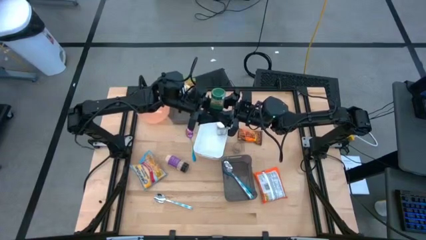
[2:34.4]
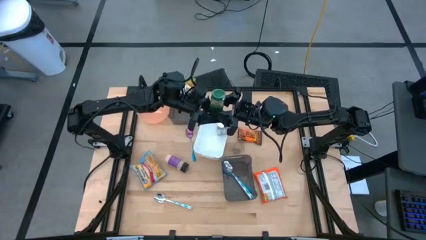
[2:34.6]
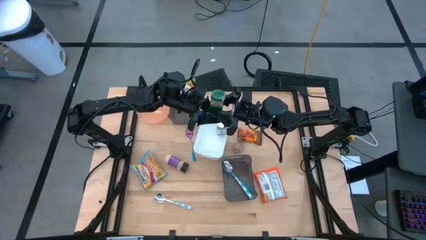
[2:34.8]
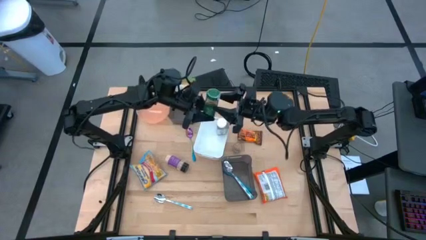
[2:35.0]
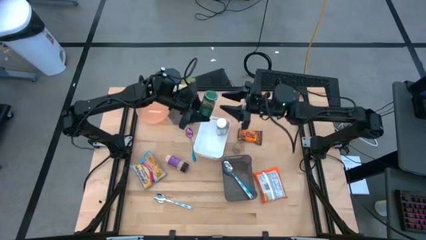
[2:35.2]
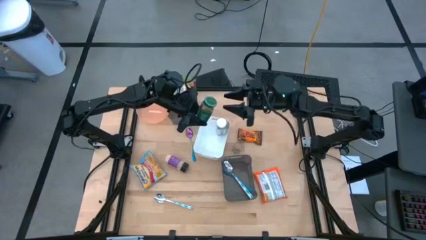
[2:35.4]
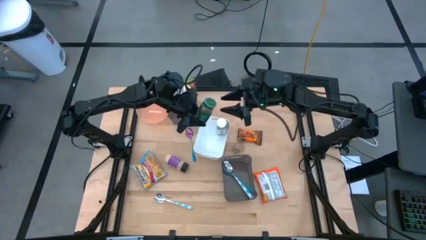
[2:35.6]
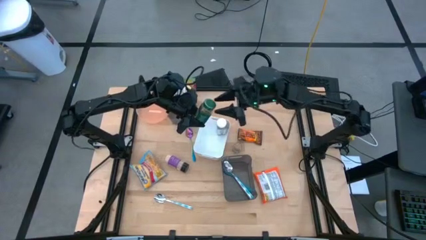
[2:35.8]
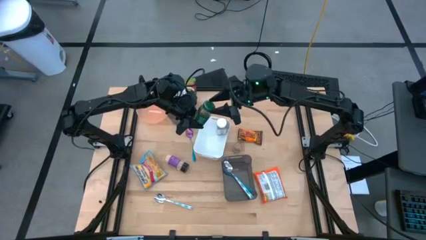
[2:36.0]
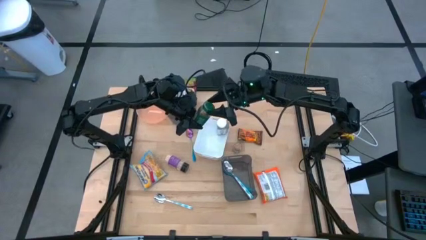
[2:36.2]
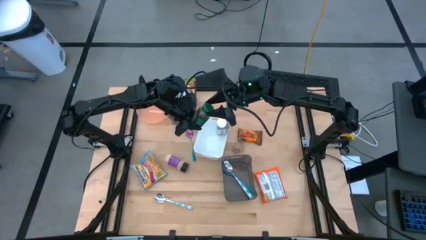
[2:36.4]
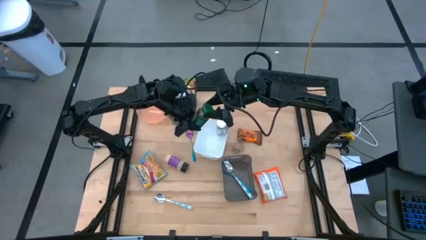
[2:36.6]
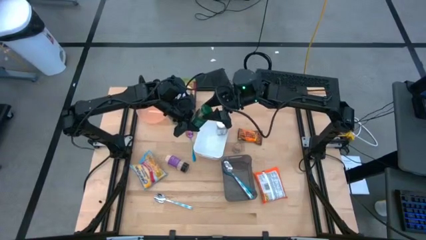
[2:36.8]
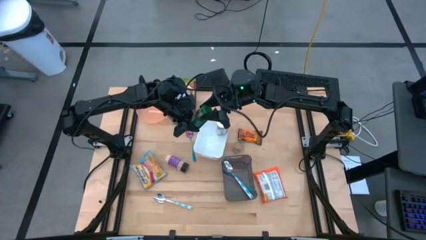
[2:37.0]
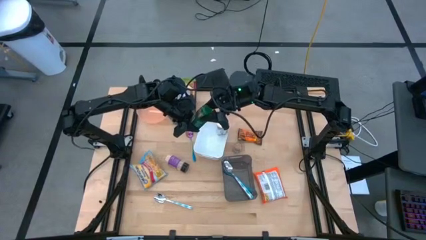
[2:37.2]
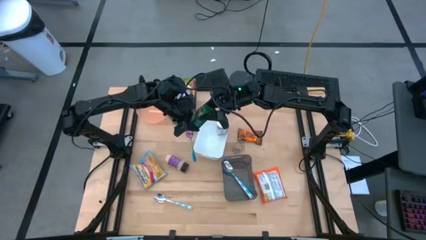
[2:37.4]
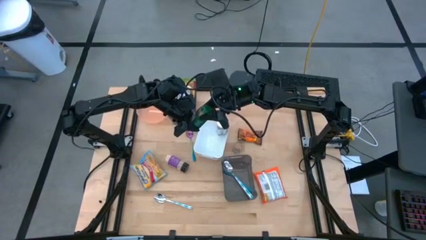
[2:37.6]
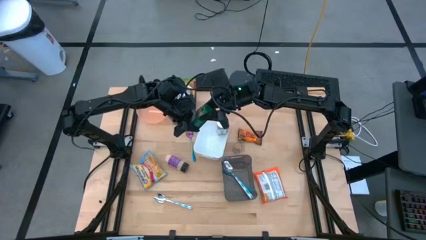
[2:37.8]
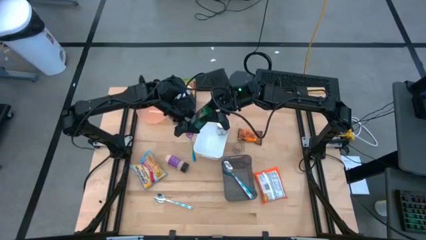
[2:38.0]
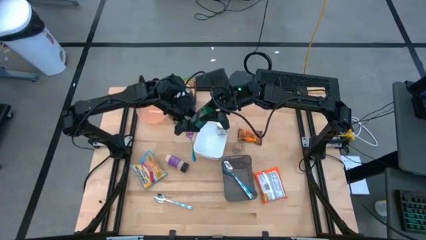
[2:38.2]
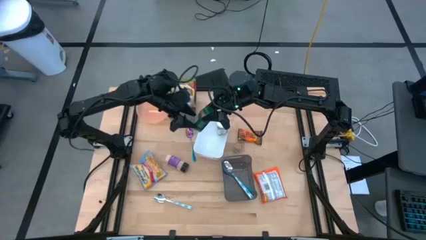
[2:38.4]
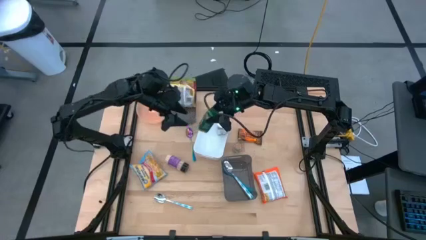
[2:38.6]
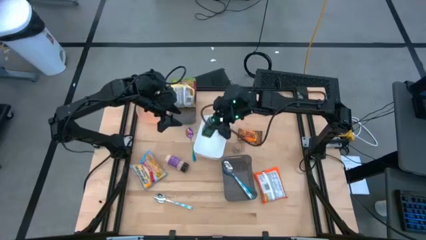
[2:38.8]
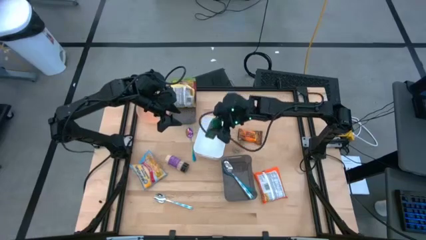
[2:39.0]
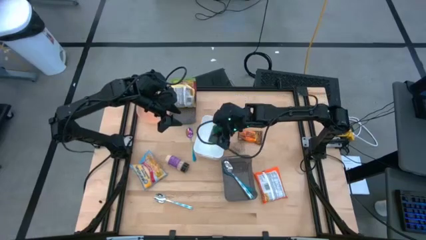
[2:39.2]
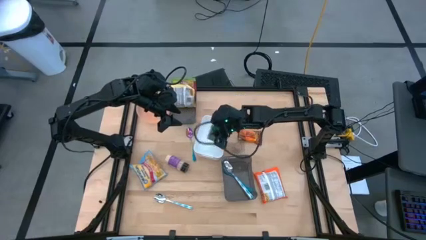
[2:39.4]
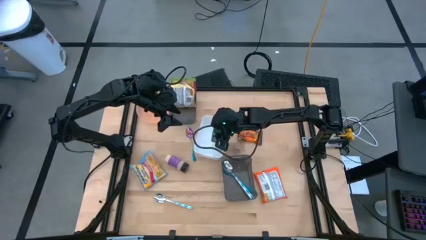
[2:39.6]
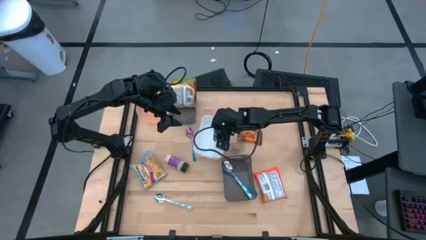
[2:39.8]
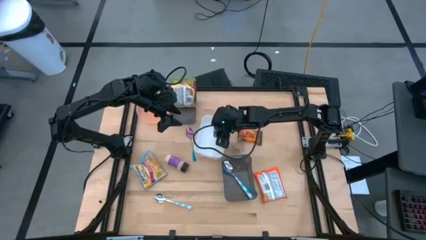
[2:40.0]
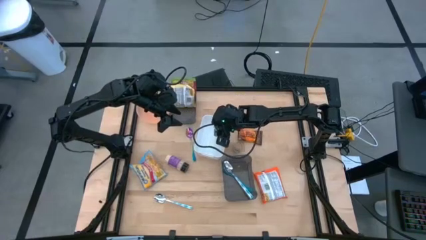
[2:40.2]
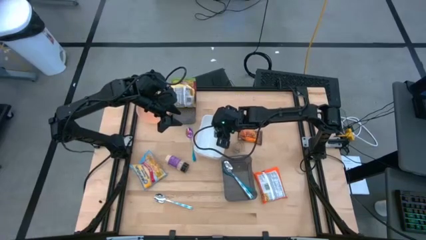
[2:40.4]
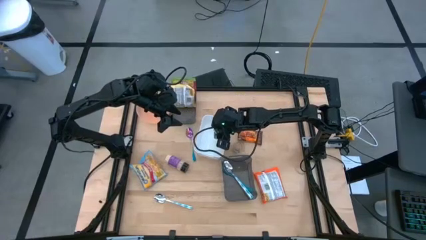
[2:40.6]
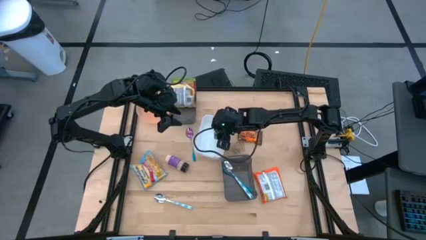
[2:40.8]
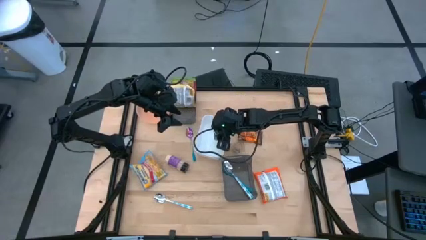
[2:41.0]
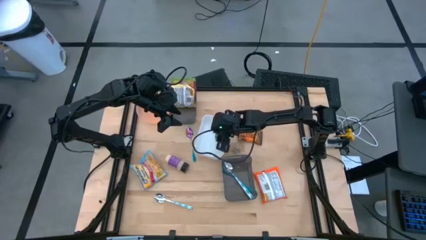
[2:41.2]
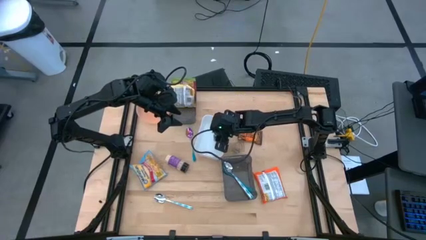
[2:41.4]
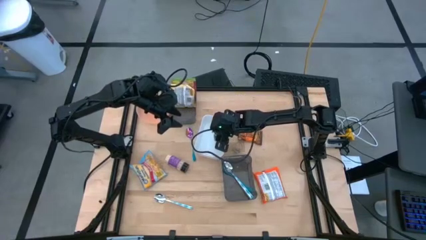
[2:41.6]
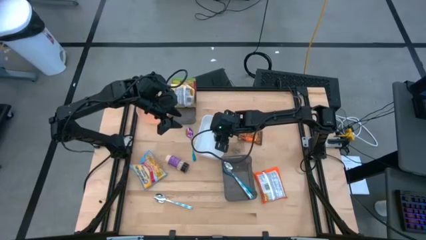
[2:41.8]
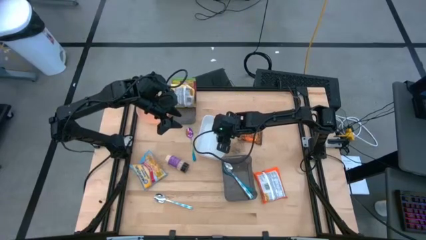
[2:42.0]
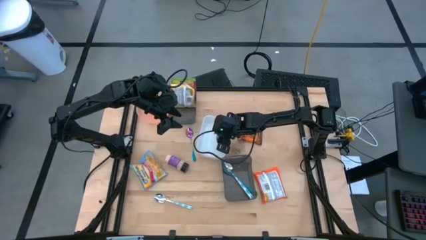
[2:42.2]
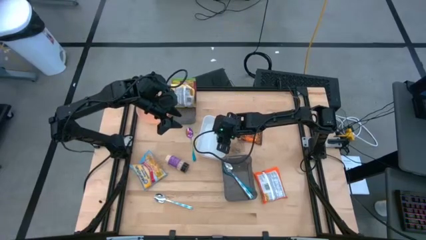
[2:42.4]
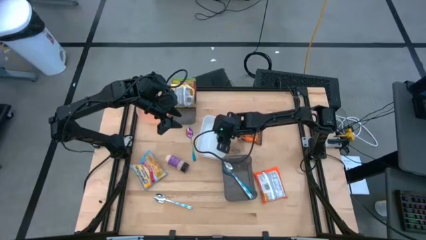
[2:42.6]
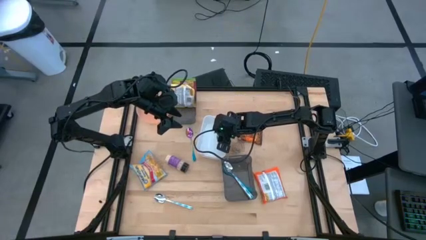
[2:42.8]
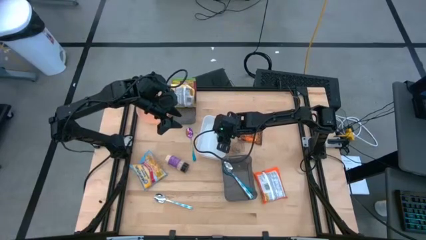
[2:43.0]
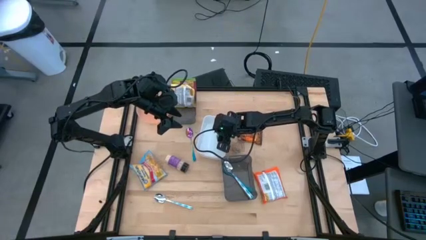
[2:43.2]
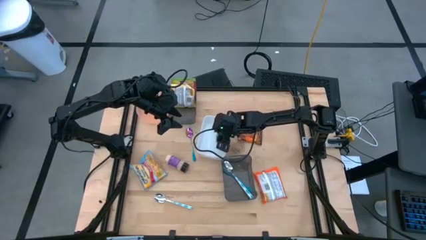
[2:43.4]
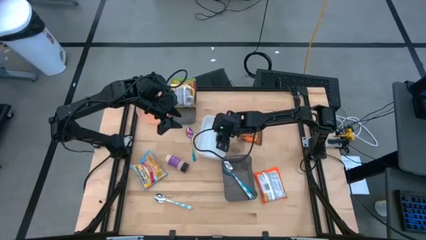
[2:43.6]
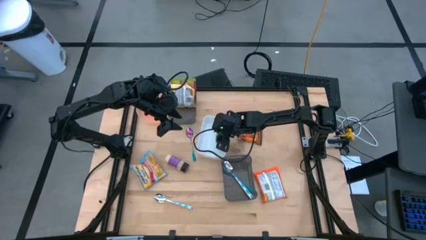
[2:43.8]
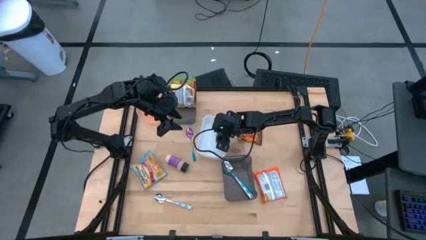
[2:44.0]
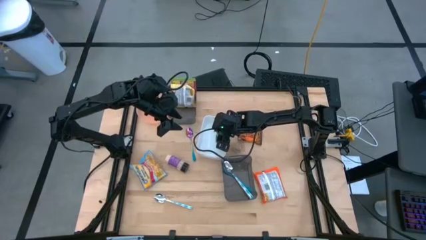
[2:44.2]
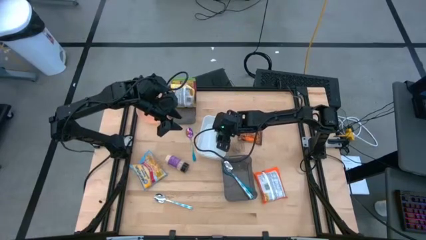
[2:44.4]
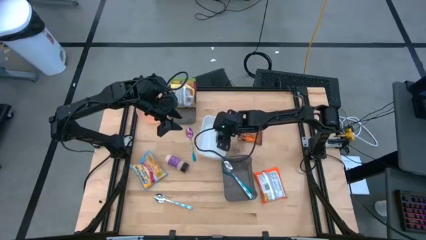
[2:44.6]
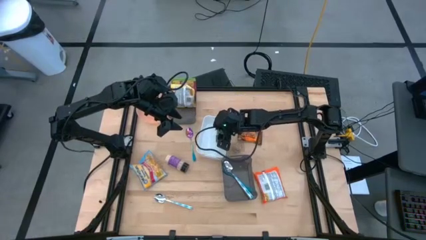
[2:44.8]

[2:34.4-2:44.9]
Task: Pick & Place Food Item
Put the green seasoning bottle into the white bin

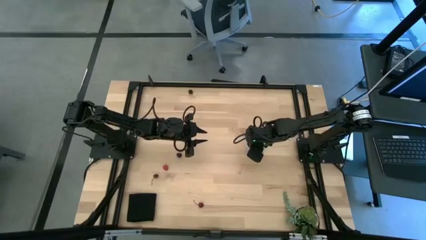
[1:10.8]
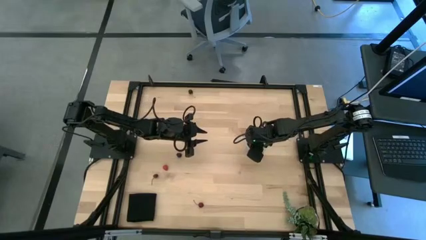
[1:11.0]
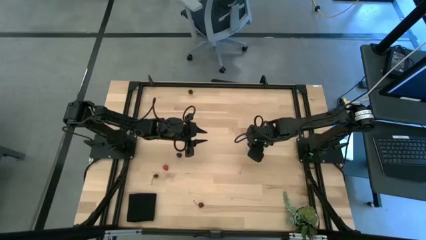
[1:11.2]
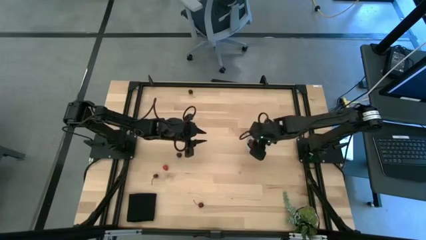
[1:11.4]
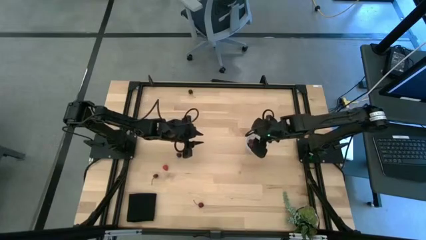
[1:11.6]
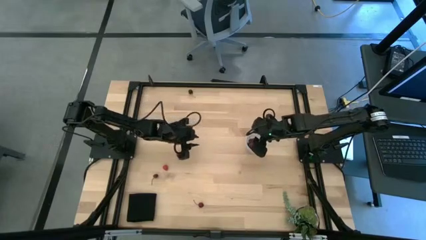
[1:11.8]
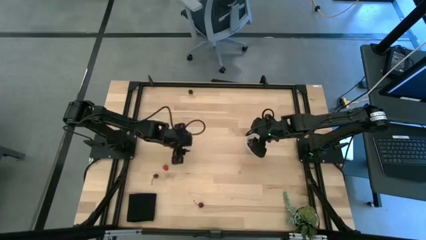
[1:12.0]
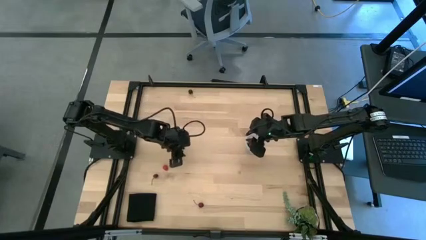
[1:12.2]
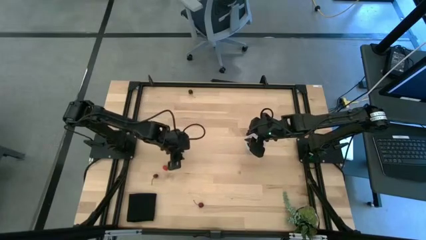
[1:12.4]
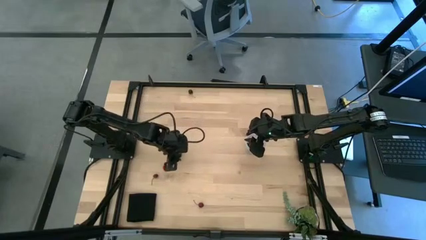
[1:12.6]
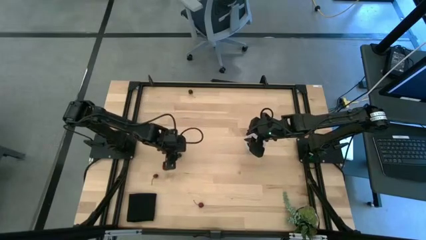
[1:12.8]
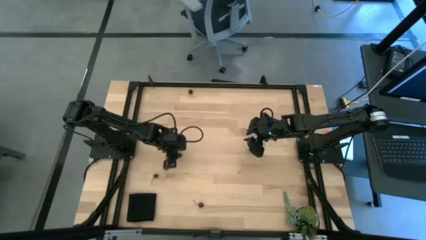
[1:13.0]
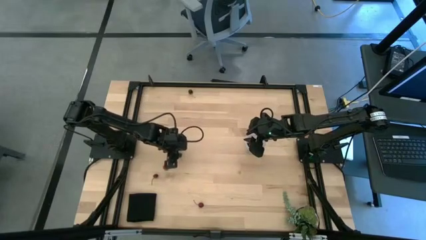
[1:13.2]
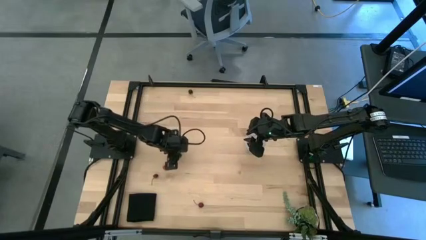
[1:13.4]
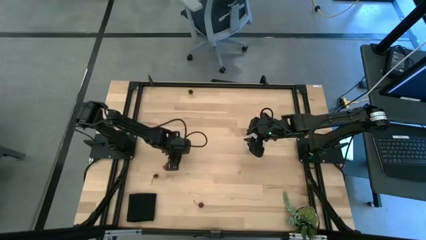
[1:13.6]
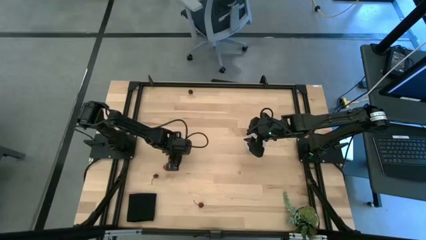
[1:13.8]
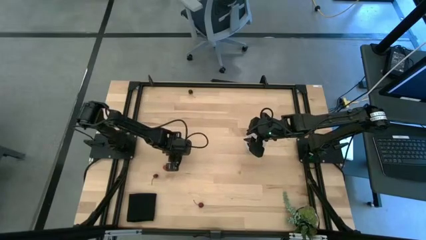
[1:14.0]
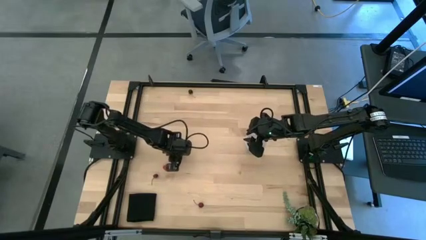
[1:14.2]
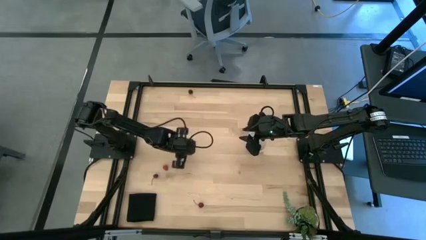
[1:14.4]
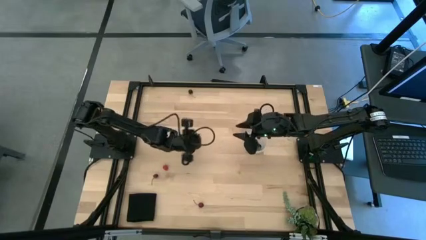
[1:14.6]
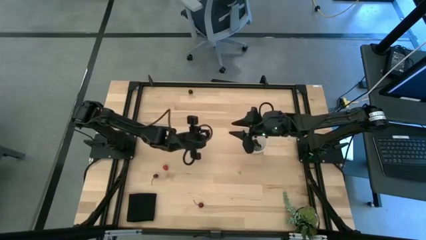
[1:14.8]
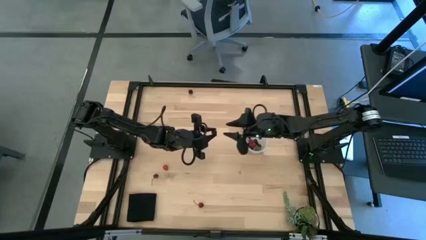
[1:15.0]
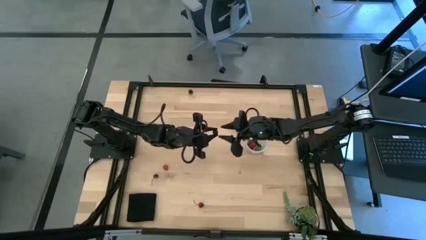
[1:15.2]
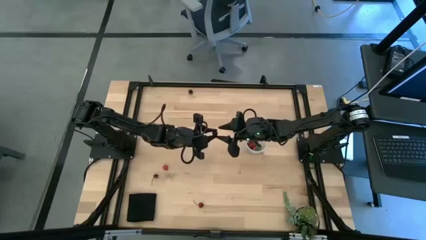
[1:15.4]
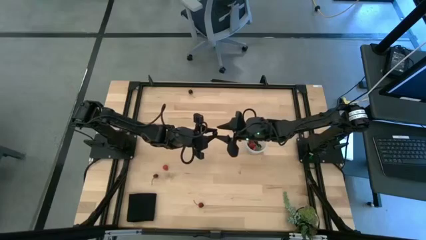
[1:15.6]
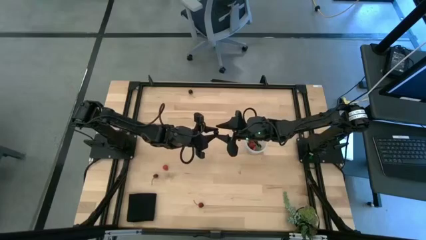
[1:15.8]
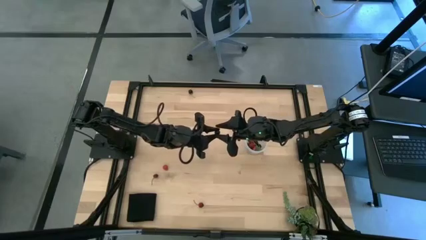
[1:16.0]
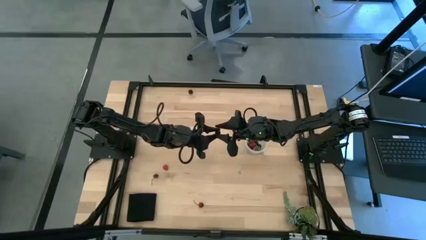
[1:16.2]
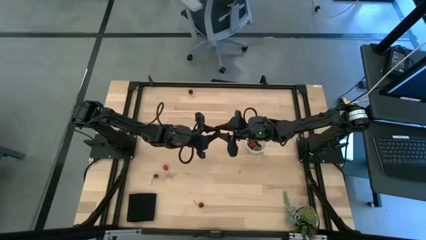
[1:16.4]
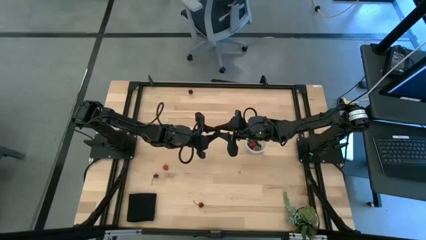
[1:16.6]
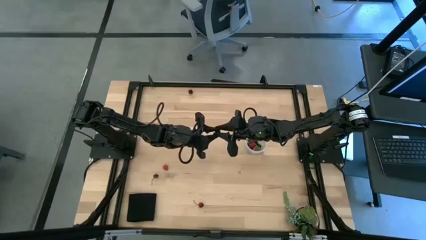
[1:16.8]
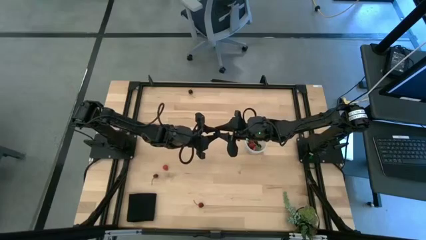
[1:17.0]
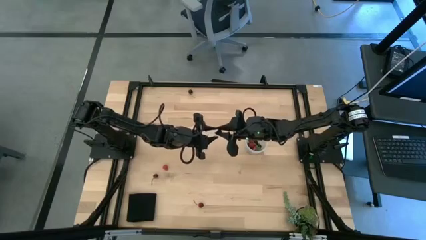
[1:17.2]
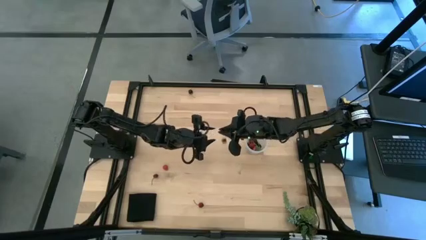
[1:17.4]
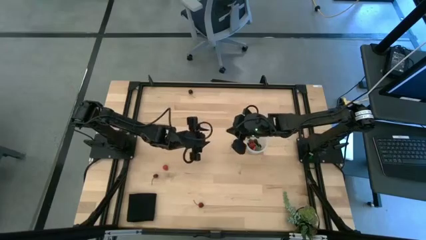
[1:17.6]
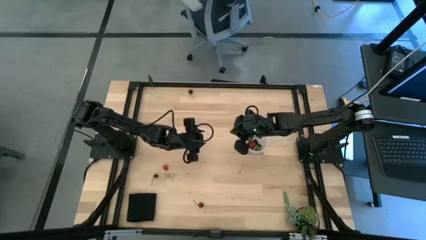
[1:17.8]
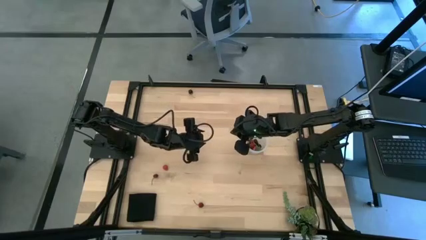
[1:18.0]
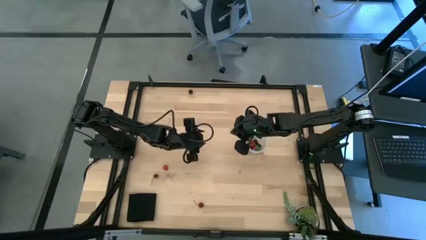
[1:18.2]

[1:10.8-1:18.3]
Task: Pick and placing Produce into tupperware
Put the blackberry into the transparent bucket
